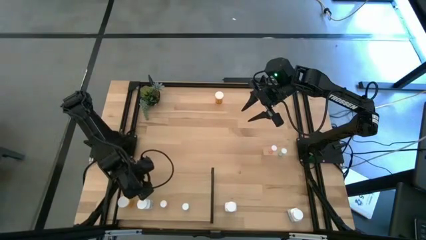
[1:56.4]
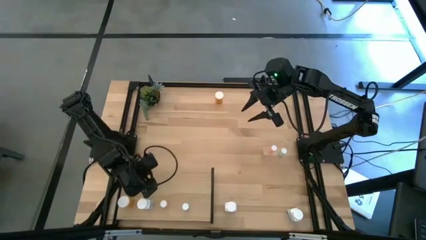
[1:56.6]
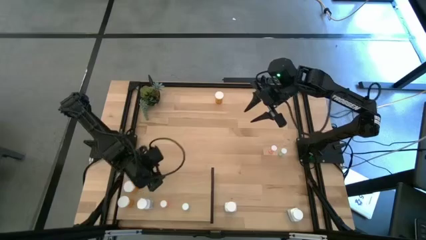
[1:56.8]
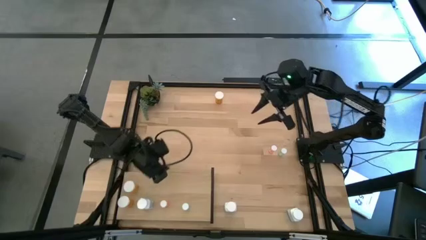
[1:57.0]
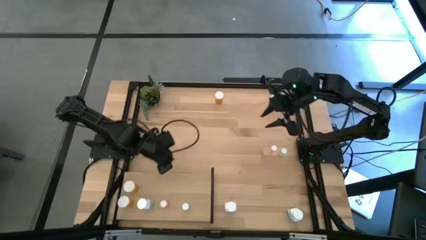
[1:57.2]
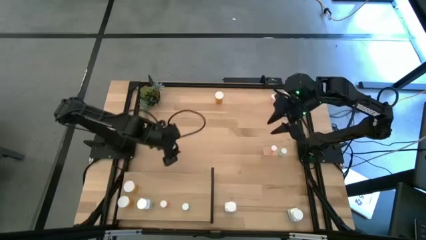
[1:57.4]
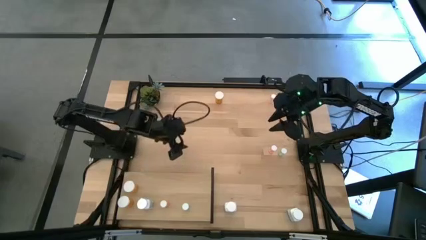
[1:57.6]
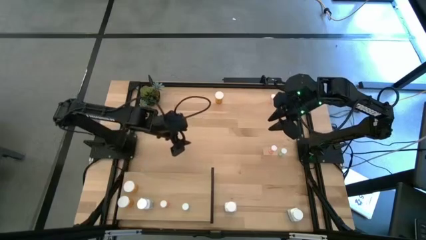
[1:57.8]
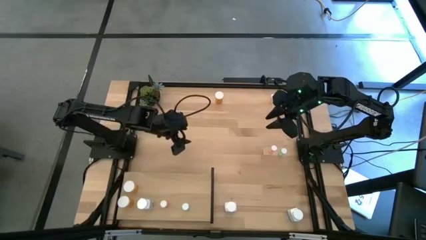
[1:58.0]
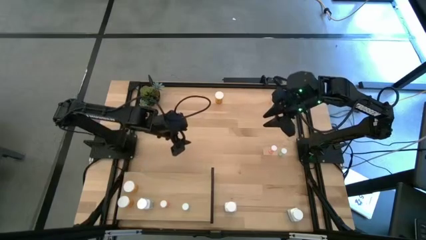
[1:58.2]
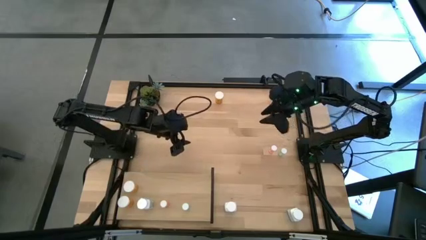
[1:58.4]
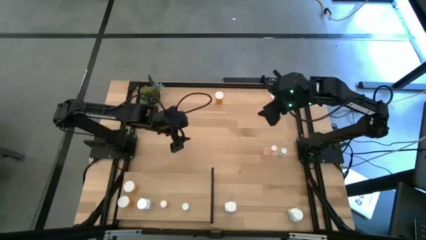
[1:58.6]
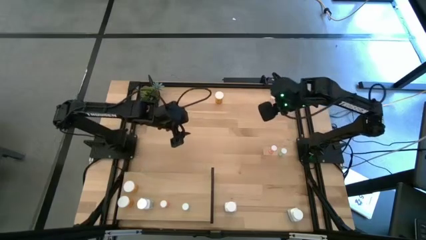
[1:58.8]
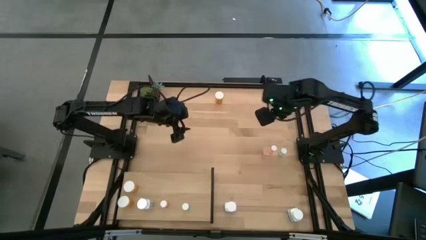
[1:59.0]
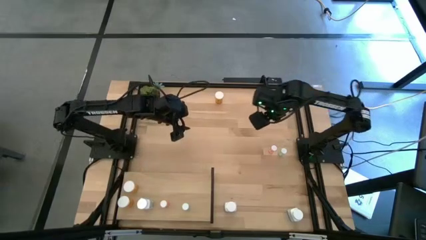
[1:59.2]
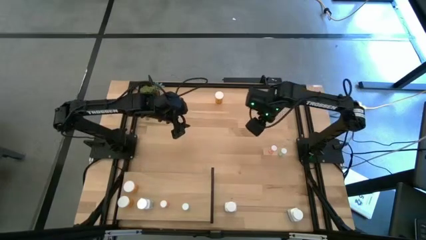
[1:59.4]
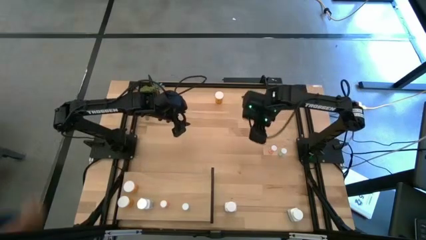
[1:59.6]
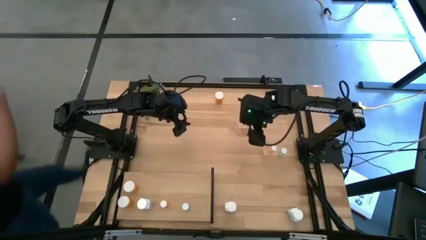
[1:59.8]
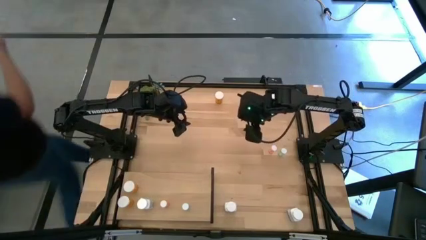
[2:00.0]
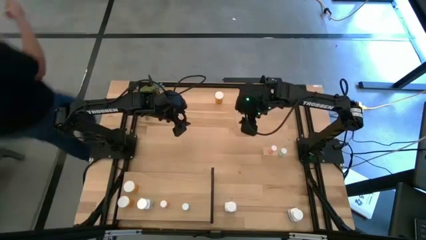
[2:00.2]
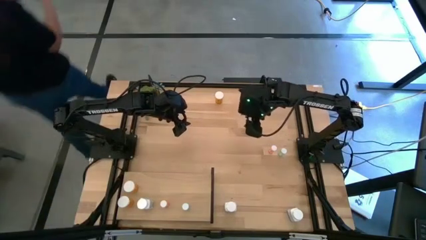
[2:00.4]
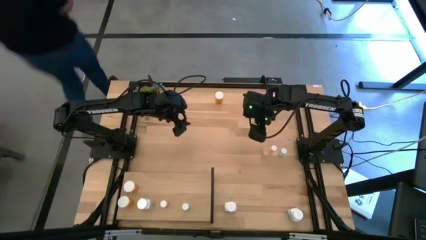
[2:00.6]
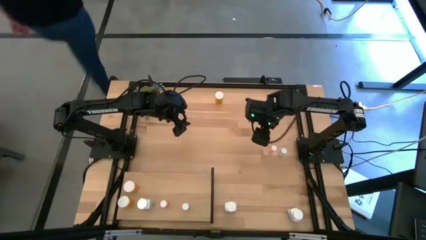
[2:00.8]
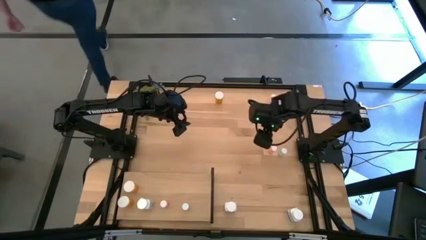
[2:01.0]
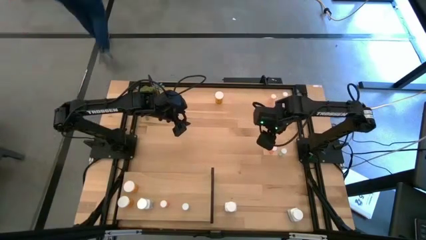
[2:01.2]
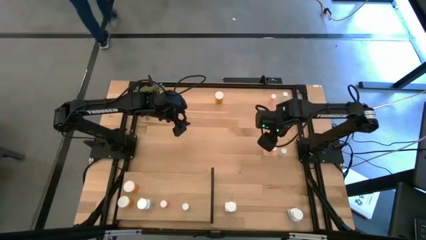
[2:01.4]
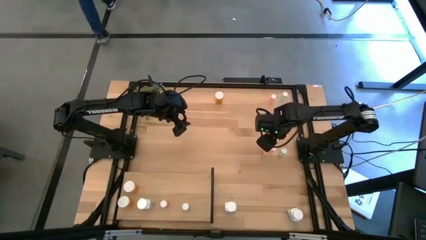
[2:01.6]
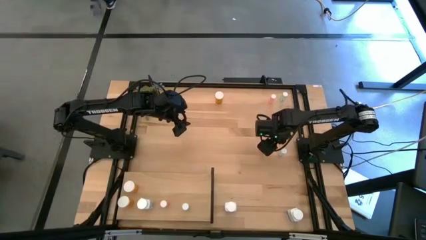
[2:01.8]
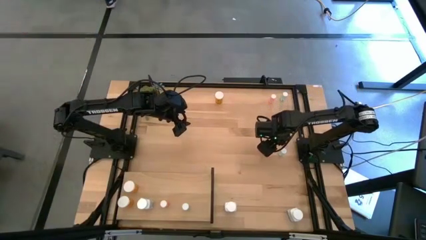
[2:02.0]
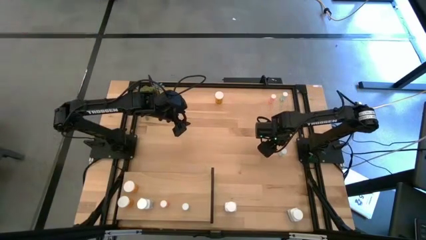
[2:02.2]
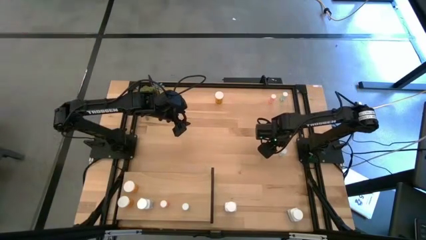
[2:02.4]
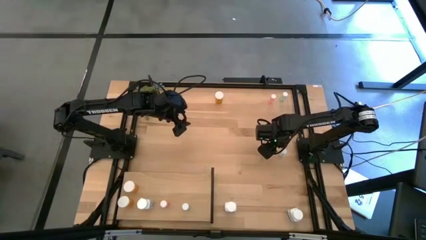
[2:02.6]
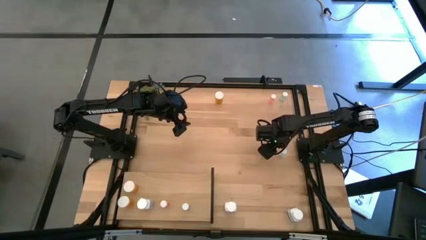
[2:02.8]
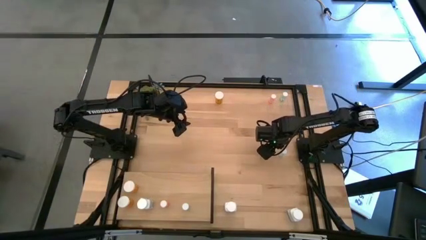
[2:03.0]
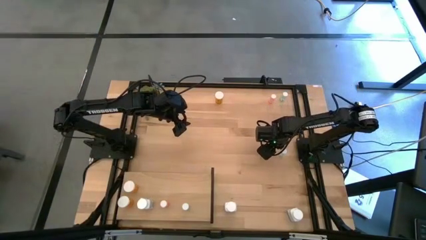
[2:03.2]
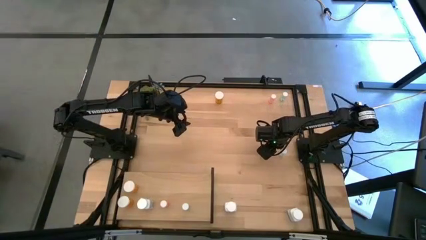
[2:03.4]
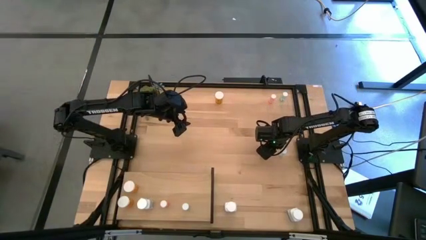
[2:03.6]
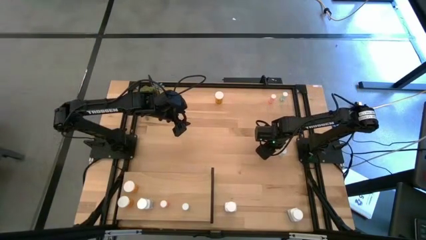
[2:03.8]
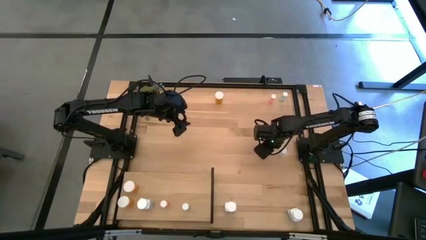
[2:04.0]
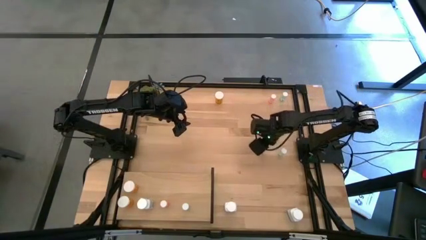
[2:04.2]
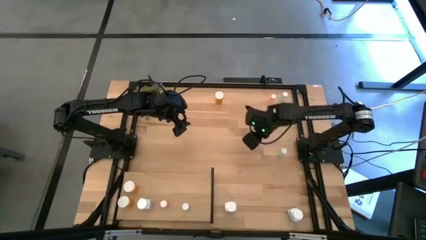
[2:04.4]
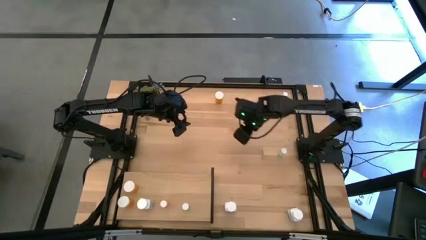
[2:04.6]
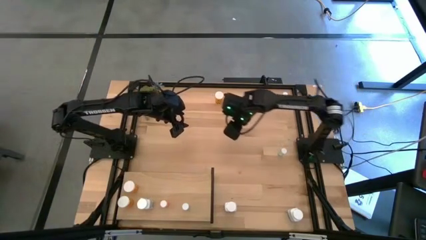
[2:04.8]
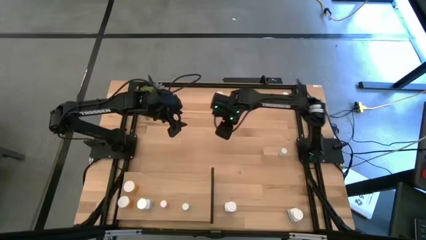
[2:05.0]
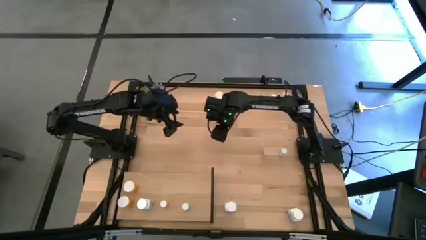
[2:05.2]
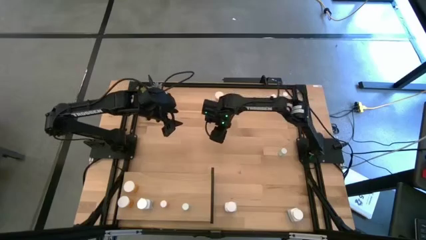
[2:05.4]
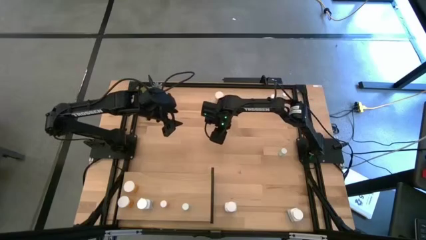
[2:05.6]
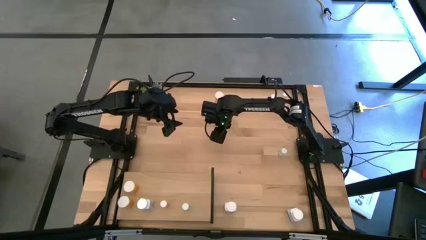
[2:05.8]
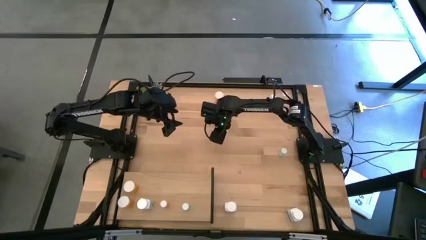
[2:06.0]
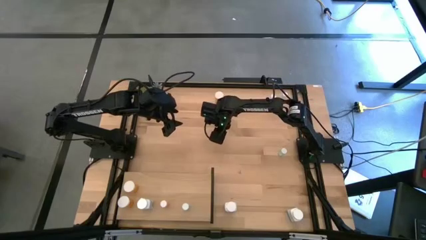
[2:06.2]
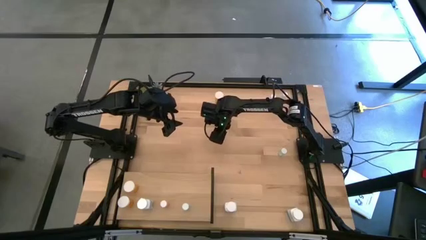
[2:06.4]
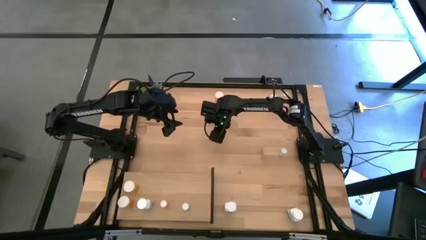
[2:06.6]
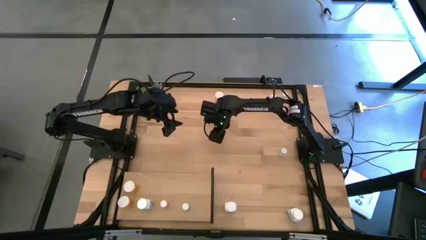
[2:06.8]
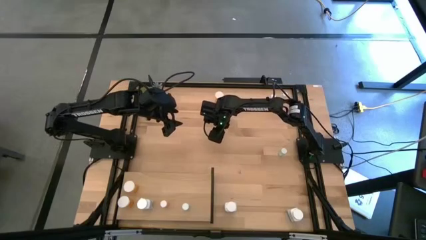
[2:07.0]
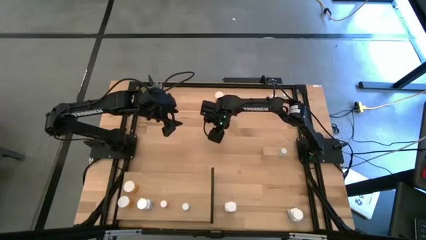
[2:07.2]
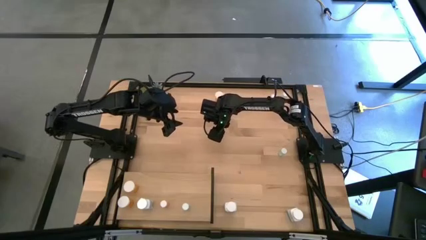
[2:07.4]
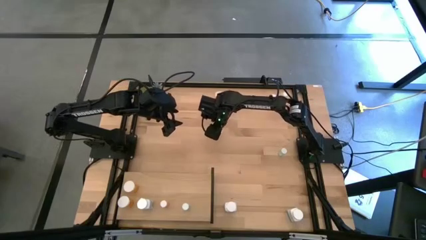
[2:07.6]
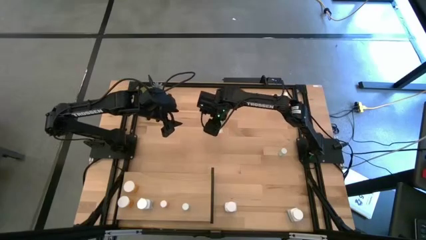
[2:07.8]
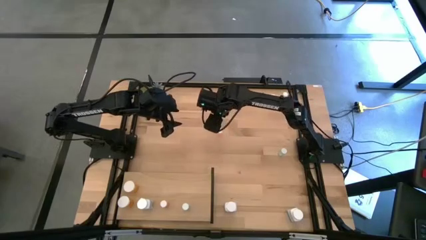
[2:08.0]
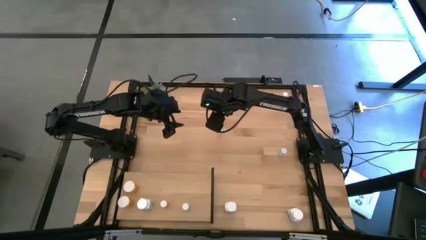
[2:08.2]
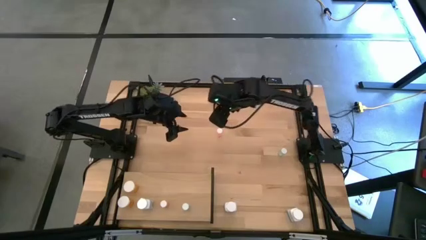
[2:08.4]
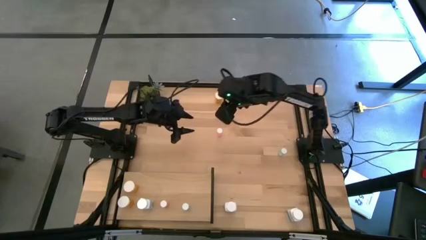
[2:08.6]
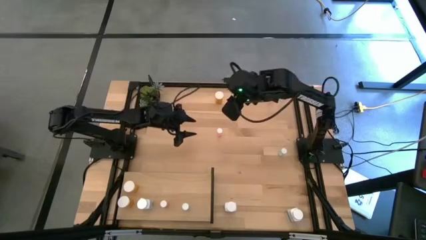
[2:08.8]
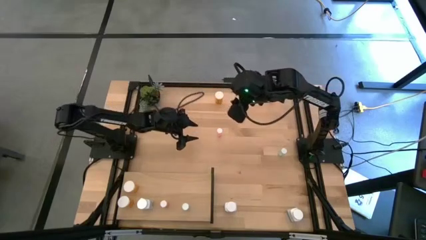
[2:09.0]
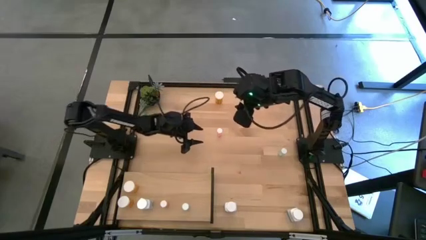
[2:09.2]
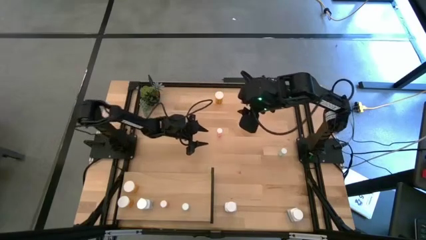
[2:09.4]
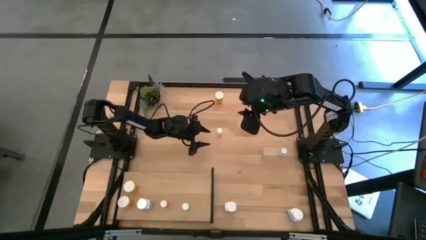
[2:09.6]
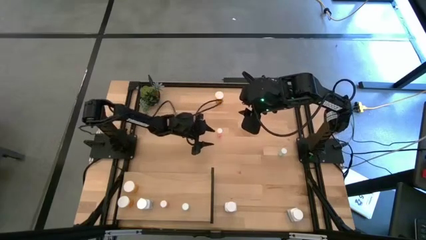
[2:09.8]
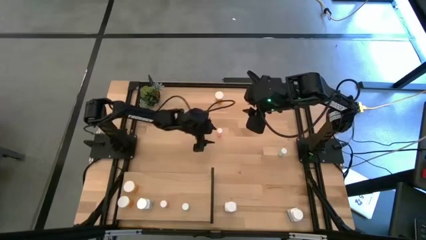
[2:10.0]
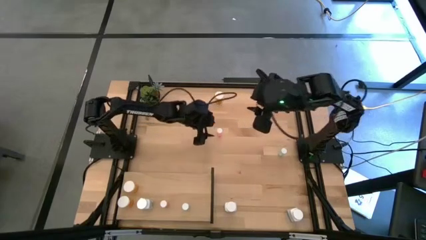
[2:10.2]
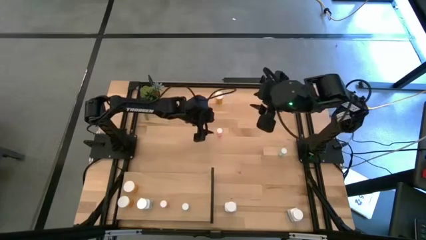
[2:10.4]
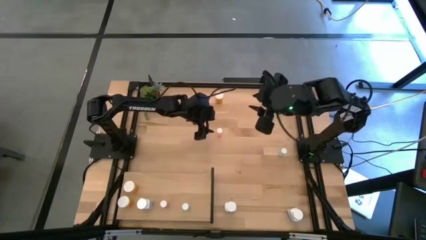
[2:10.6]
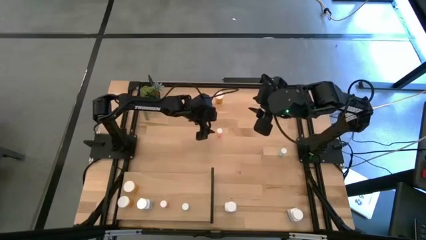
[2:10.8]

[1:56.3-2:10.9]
Task: Pick and place medicine bottles onto shelf by color
Put the bottom small red pill bottle on the shelf aligned with the other small red pill bottle
